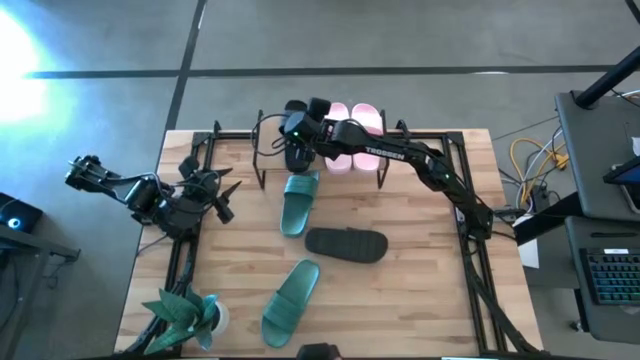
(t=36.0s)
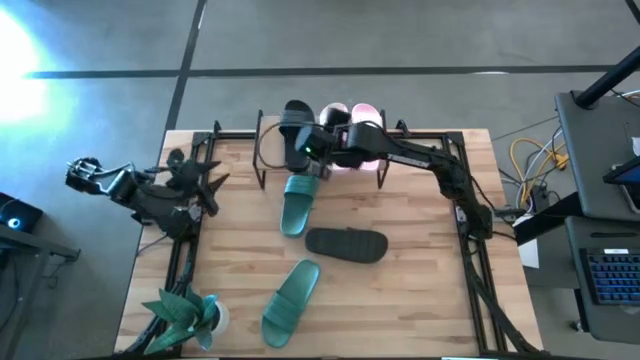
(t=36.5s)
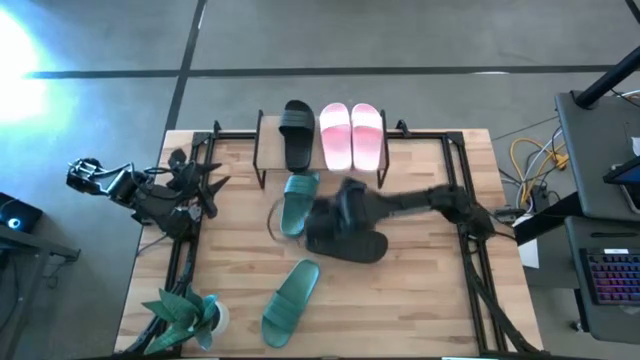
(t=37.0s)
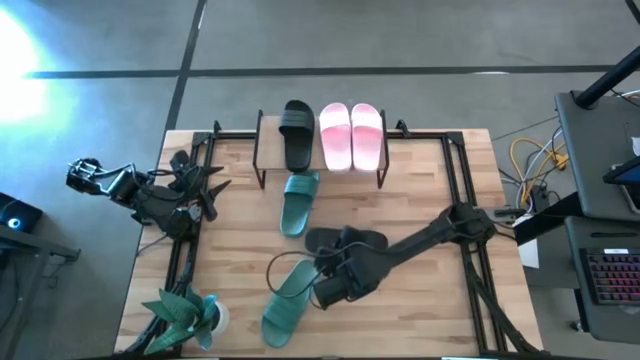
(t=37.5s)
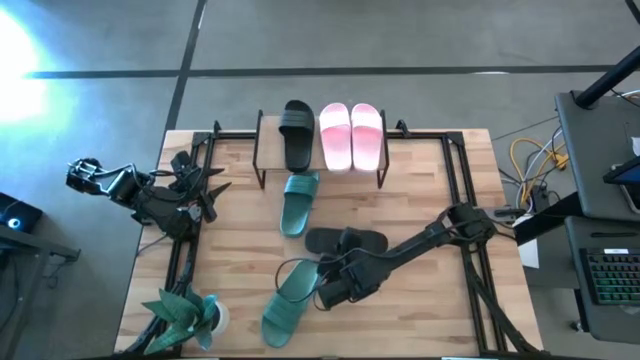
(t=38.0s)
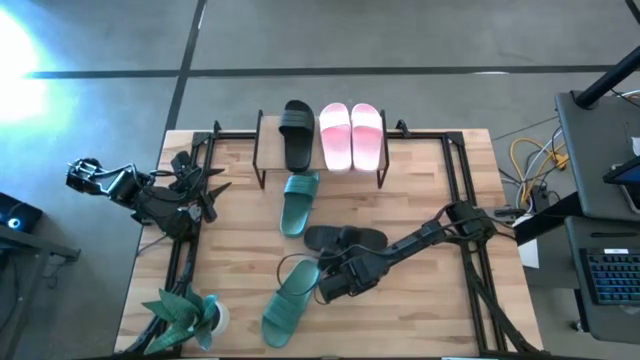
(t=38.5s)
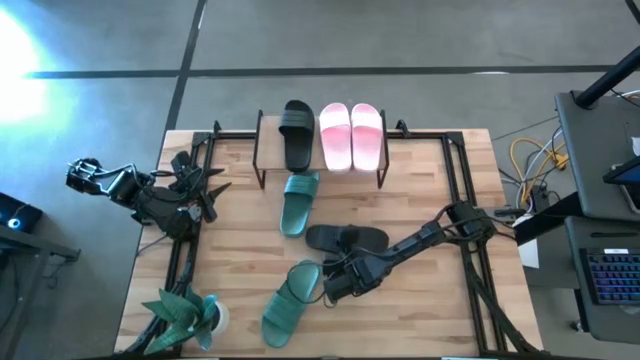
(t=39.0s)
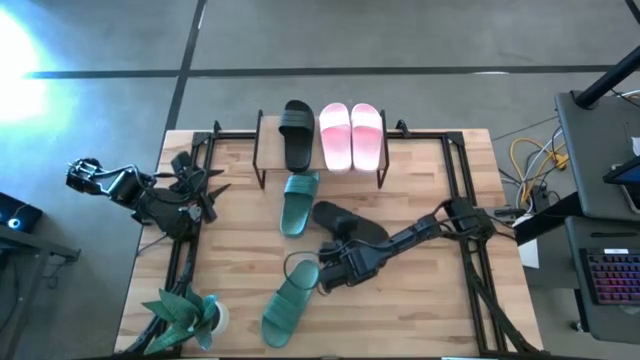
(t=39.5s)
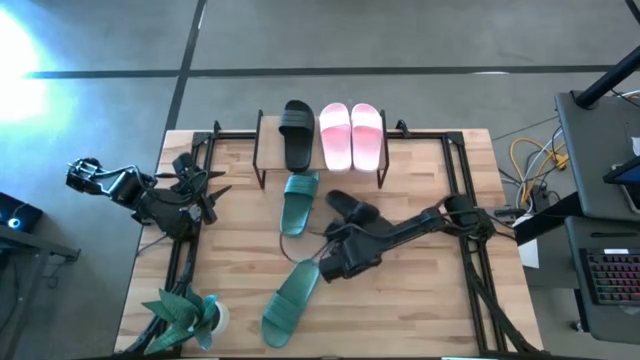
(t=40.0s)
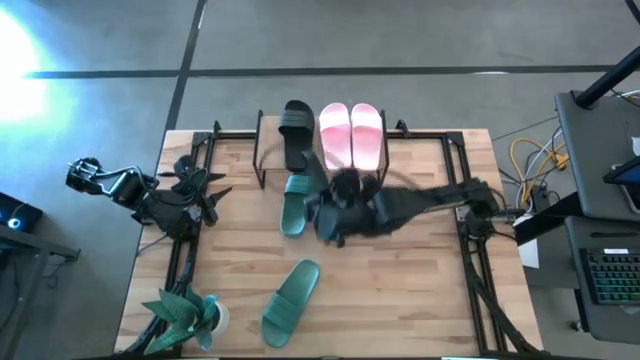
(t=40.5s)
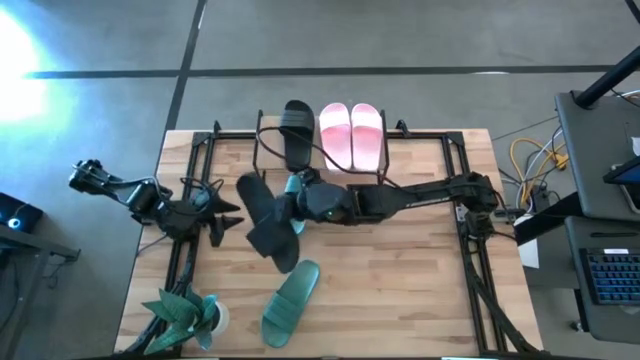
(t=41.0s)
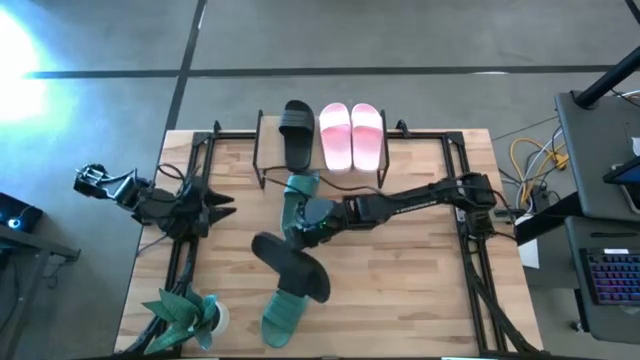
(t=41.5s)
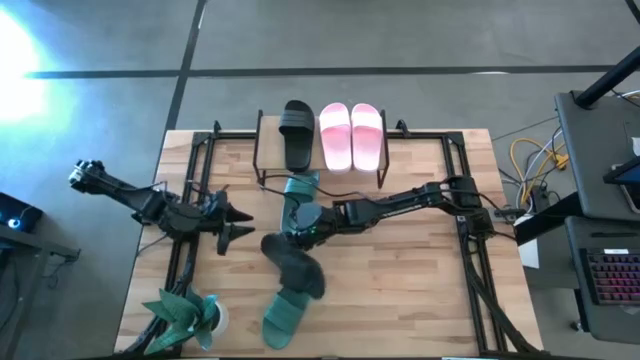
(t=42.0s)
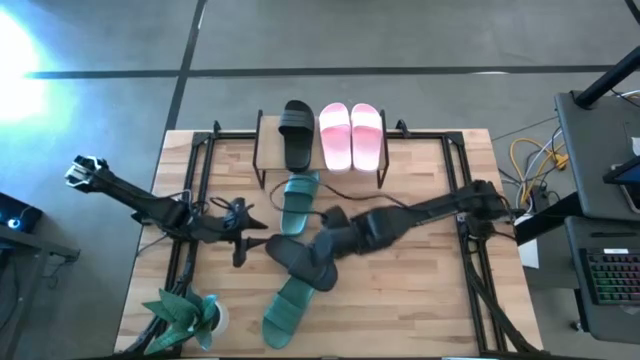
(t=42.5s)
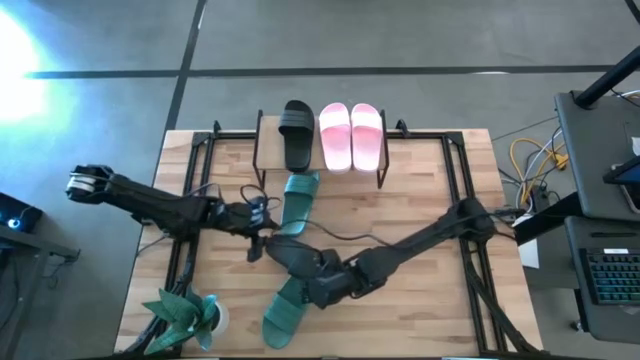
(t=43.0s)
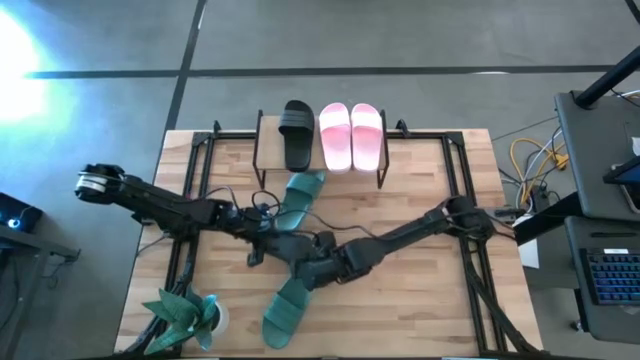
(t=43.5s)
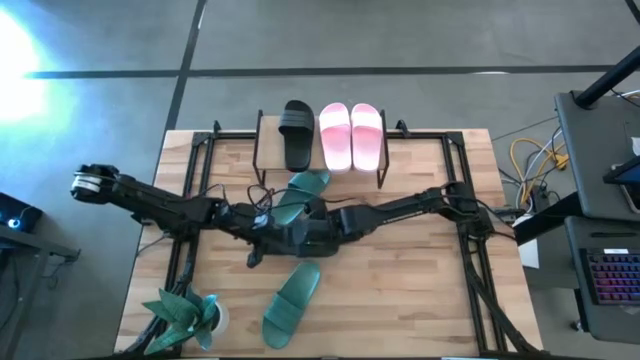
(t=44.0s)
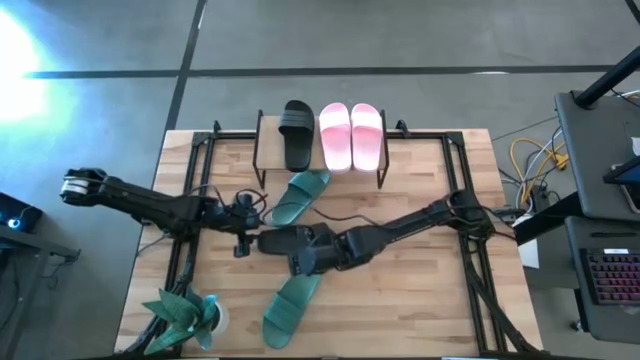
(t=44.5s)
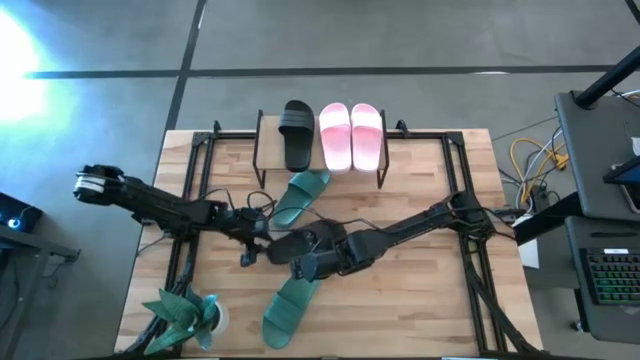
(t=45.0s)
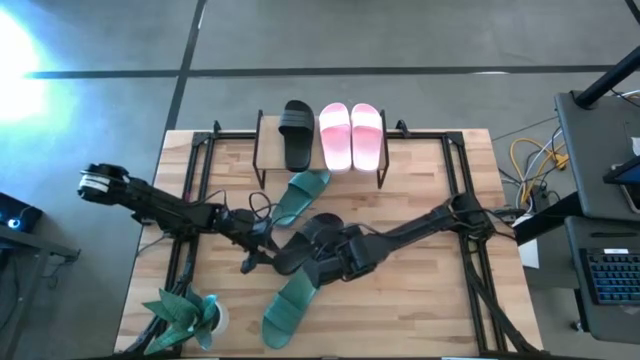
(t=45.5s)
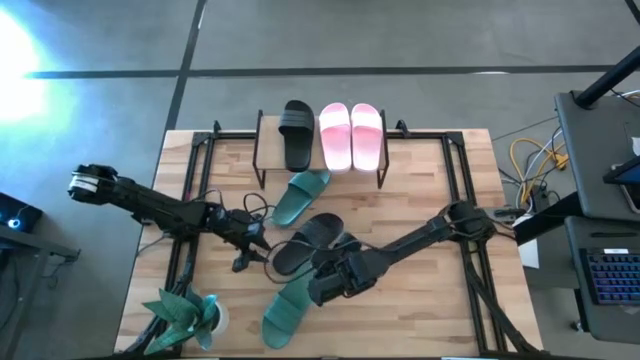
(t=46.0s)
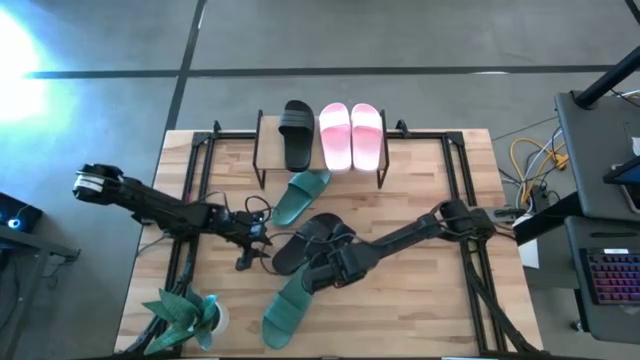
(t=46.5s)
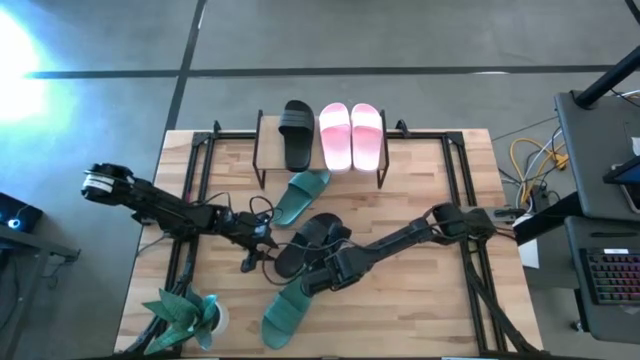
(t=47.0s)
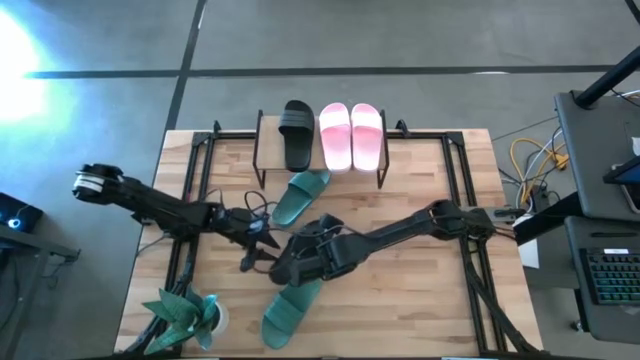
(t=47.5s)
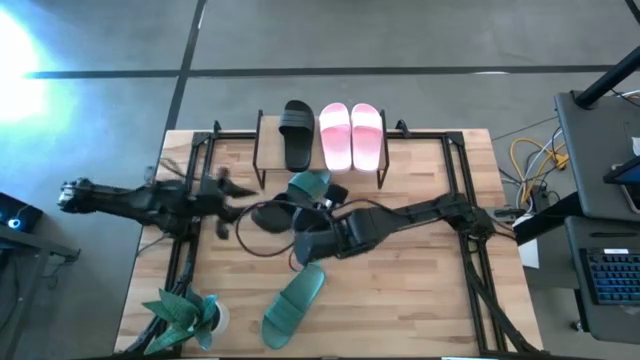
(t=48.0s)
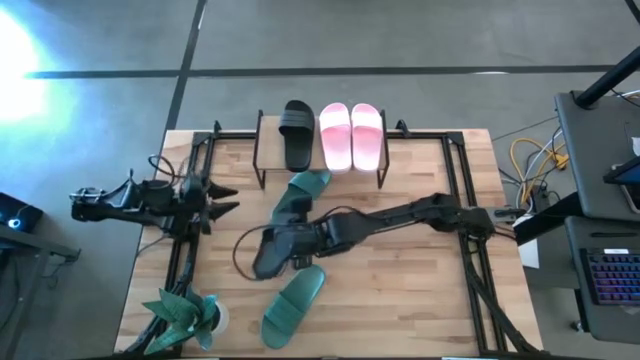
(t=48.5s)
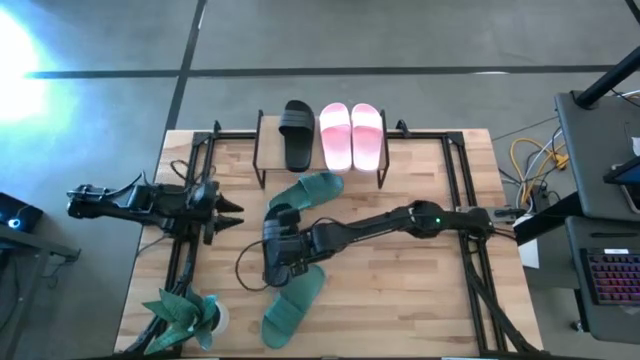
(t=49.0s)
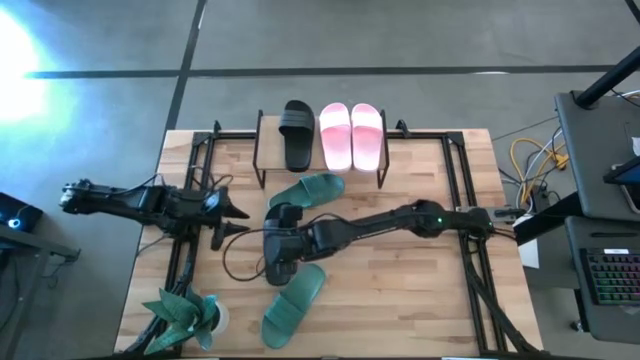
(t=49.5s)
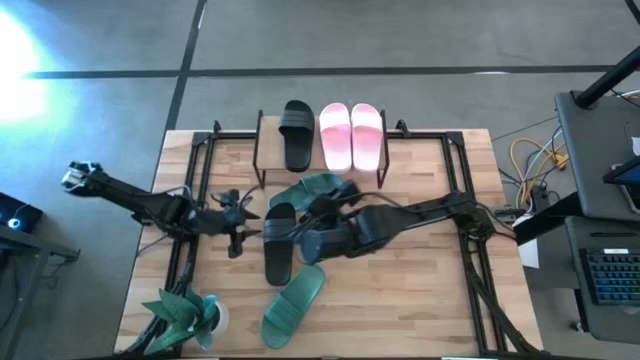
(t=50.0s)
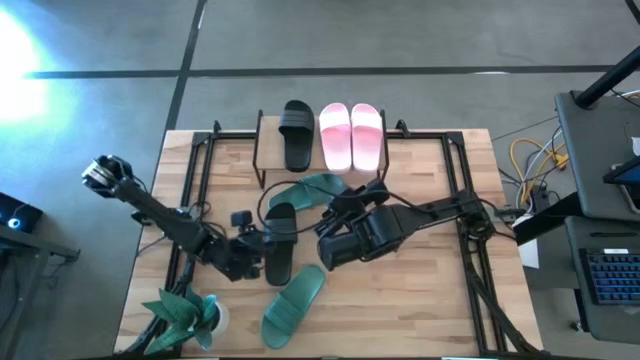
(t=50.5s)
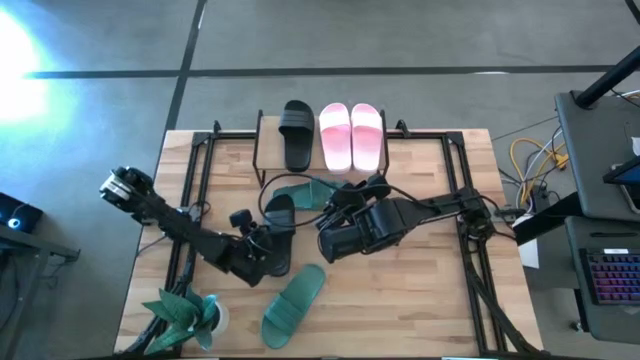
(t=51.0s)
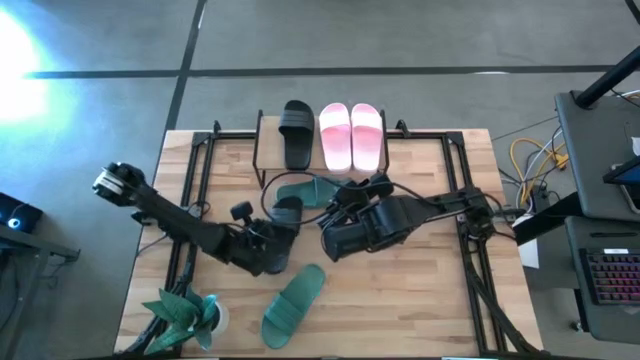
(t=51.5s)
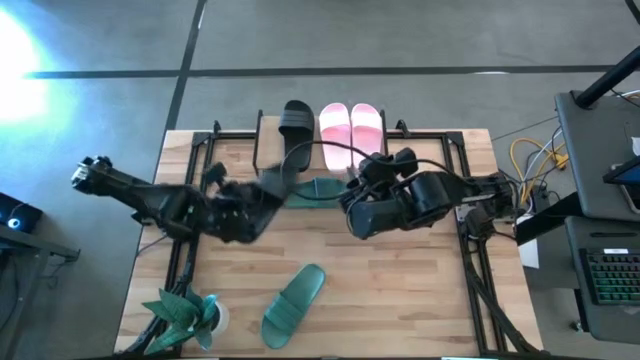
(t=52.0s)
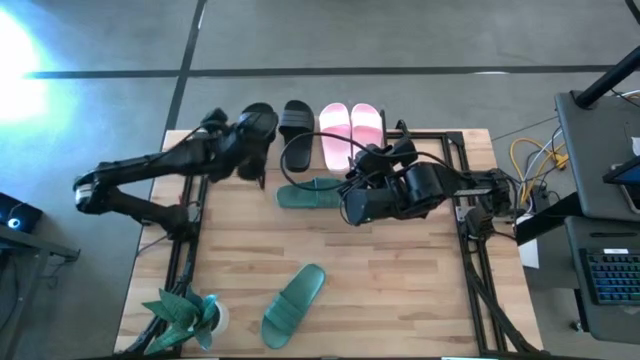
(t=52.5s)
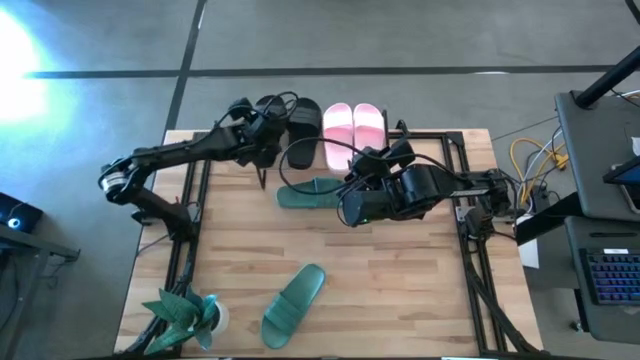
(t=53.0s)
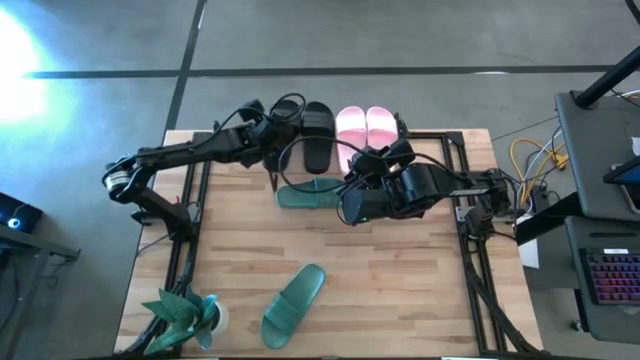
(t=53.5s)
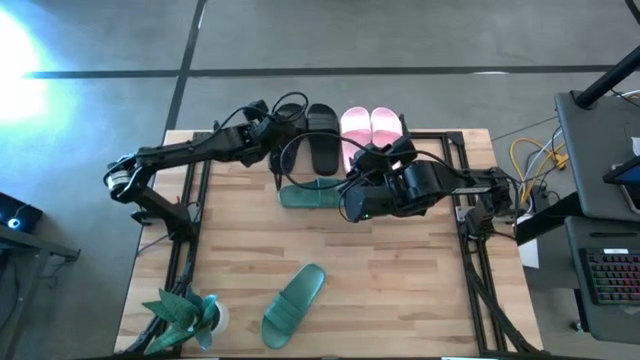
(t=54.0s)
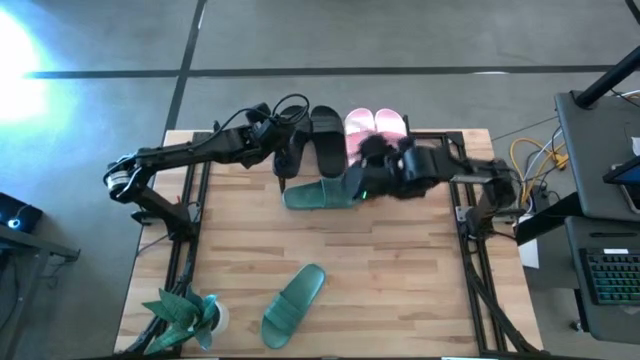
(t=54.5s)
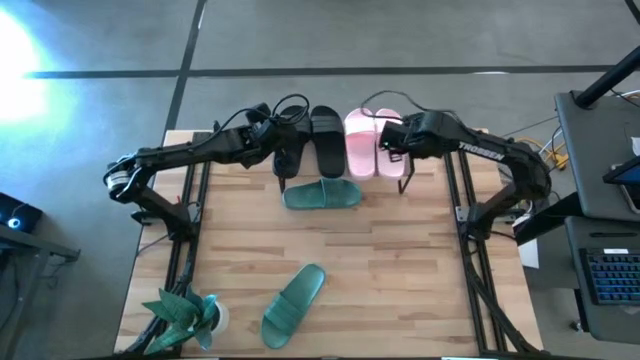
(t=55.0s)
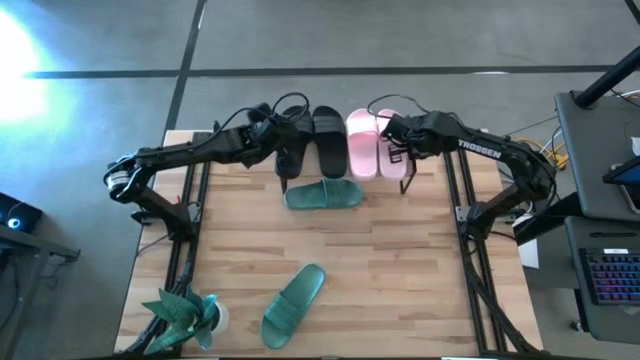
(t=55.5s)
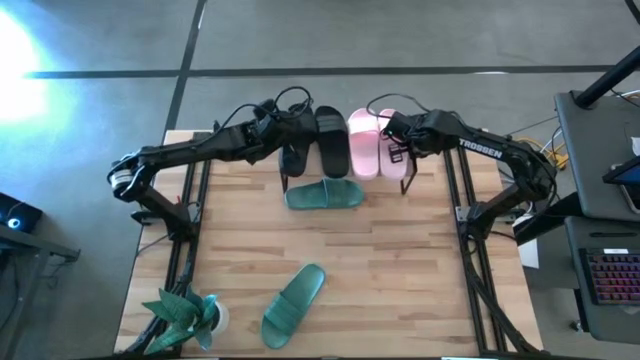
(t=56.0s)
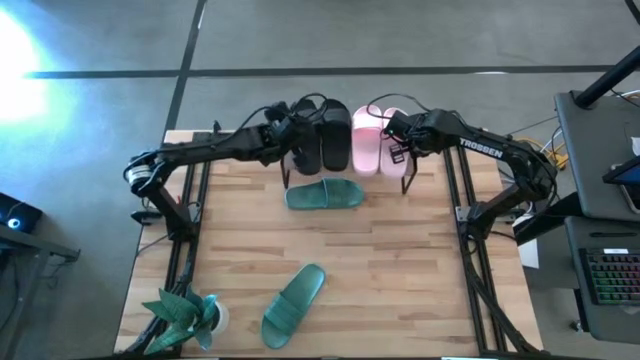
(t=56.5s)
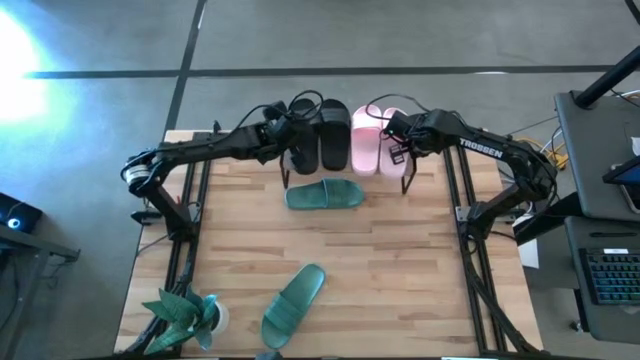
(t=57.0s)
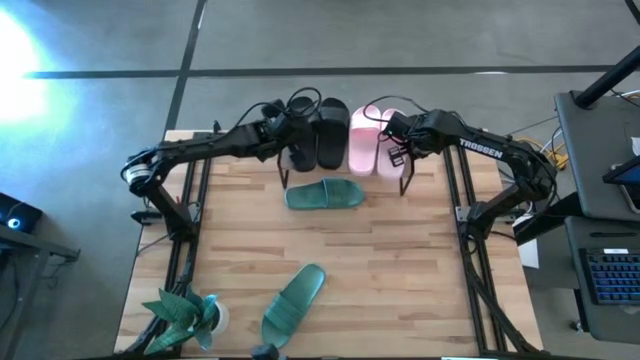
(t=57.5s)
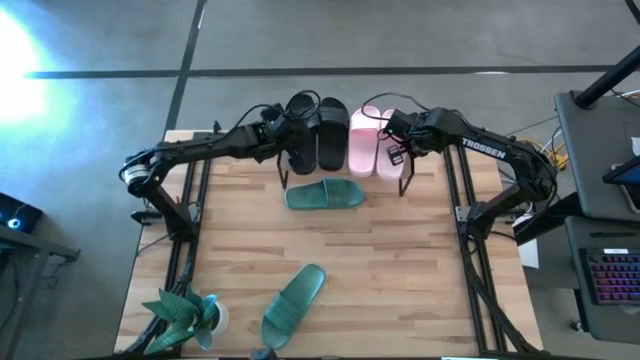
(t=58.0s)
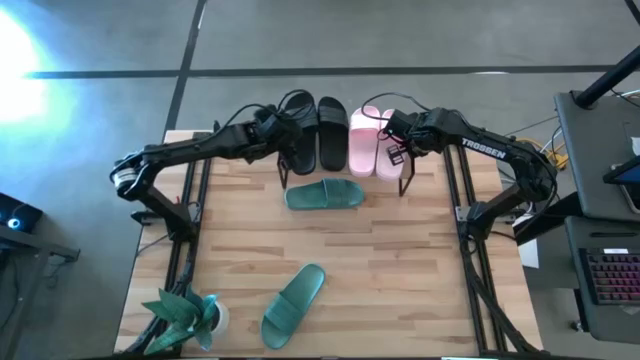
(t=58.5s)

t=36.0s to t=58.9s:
Task: Pick and place slides into the shelf
Put the black slipper on the shelf
